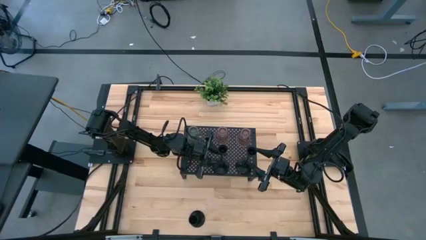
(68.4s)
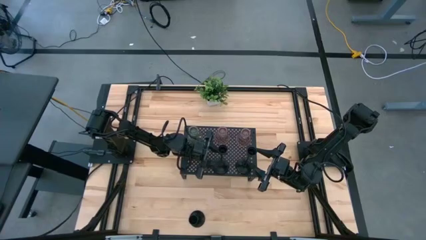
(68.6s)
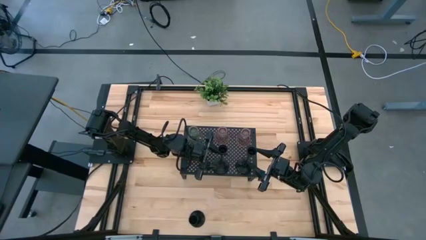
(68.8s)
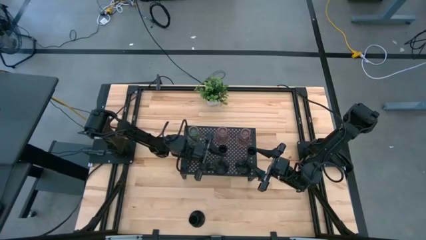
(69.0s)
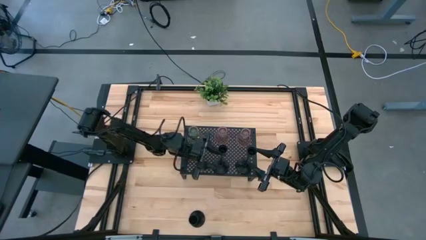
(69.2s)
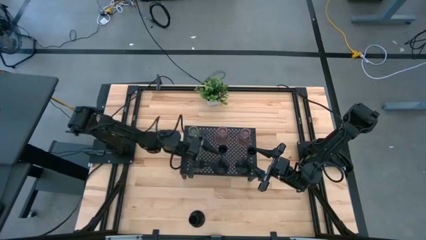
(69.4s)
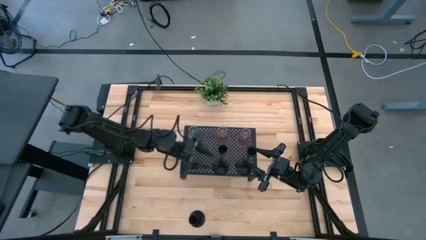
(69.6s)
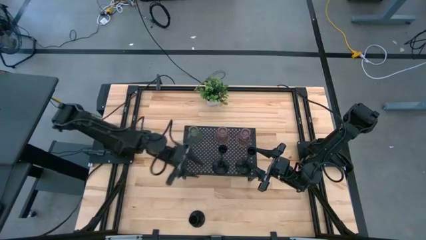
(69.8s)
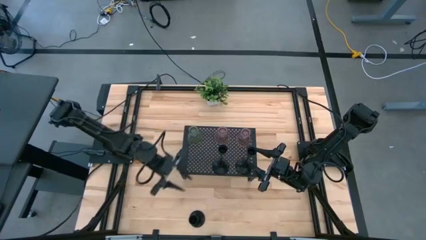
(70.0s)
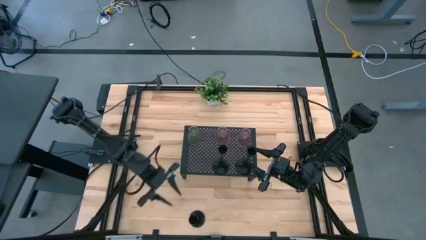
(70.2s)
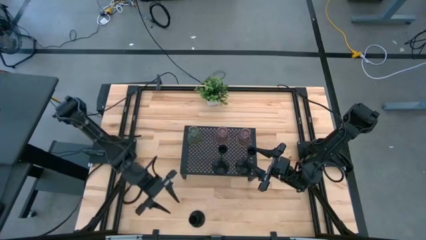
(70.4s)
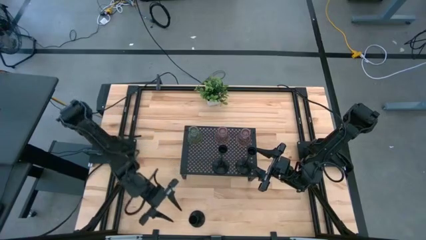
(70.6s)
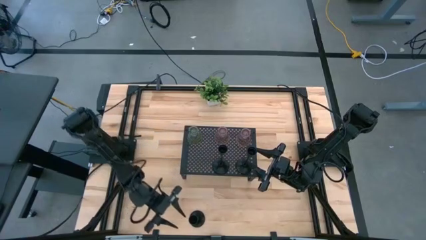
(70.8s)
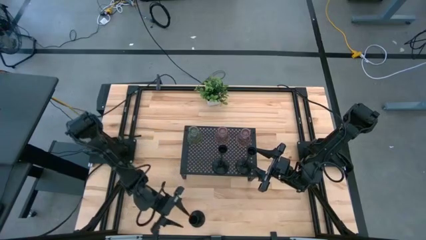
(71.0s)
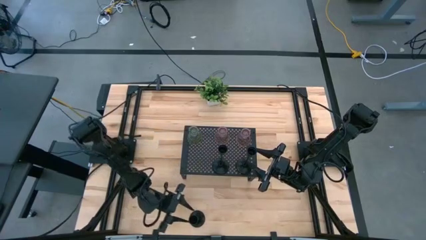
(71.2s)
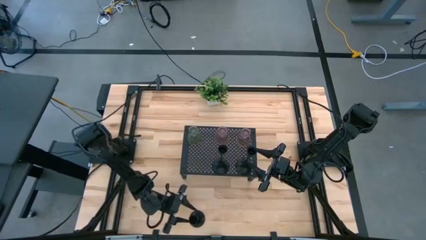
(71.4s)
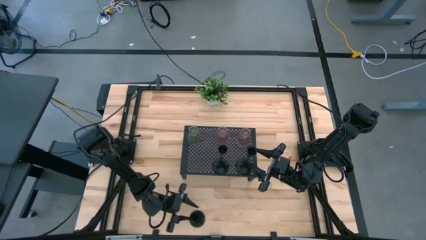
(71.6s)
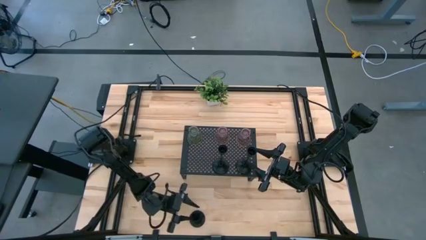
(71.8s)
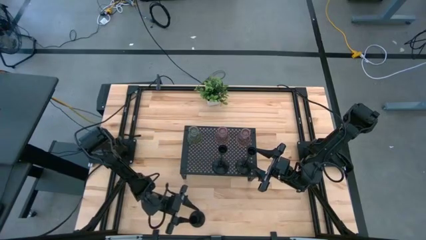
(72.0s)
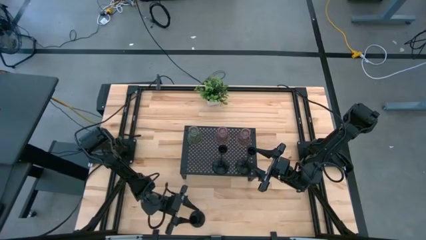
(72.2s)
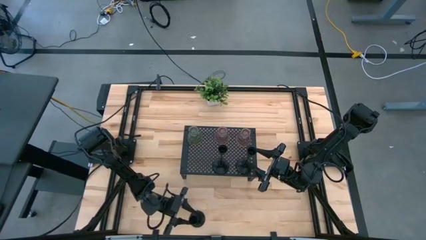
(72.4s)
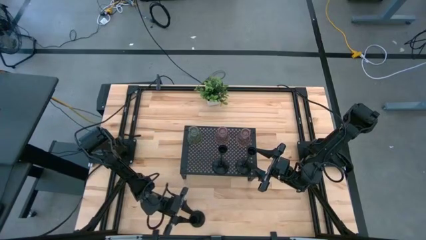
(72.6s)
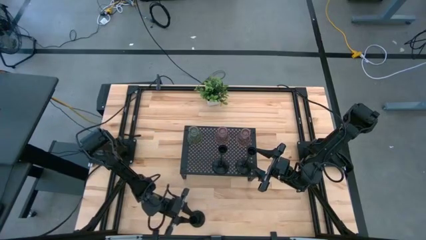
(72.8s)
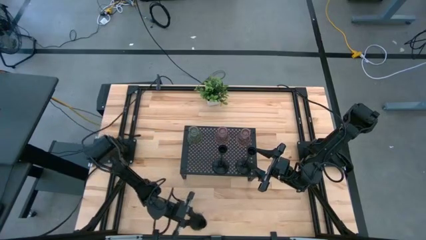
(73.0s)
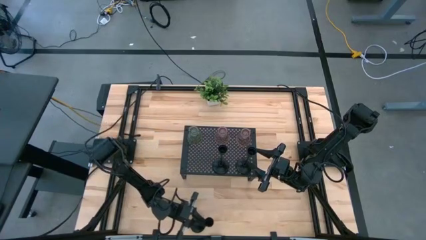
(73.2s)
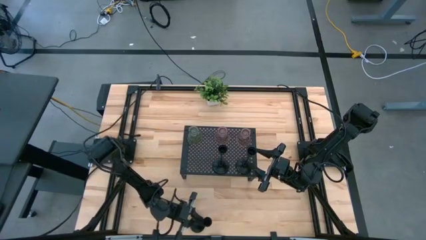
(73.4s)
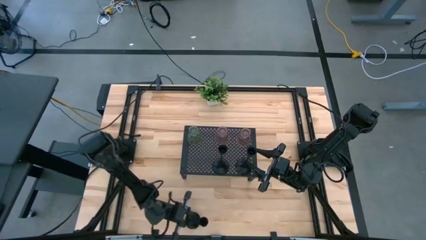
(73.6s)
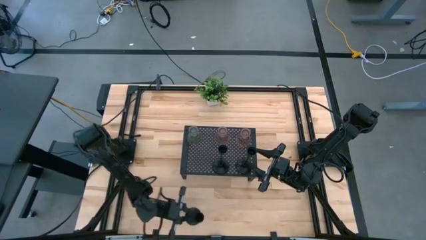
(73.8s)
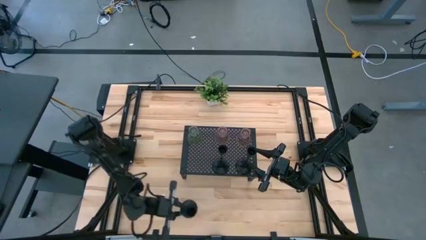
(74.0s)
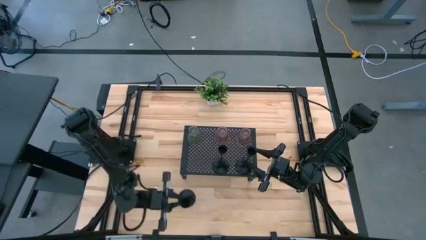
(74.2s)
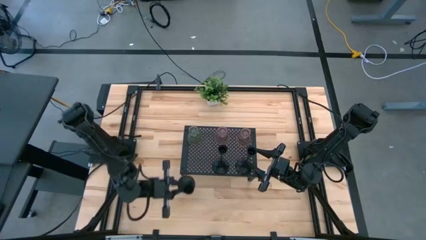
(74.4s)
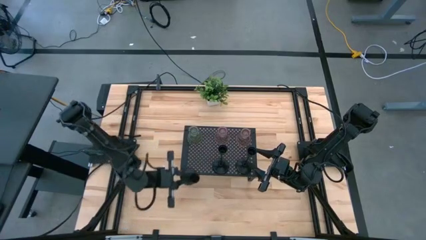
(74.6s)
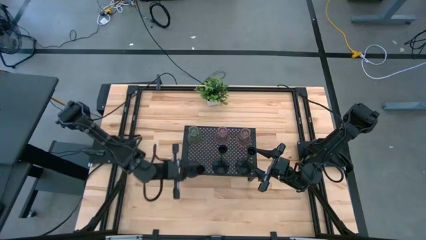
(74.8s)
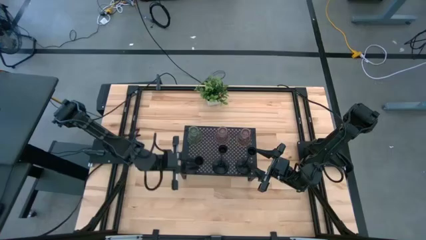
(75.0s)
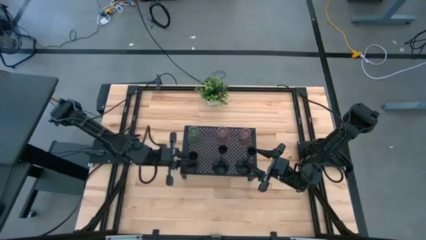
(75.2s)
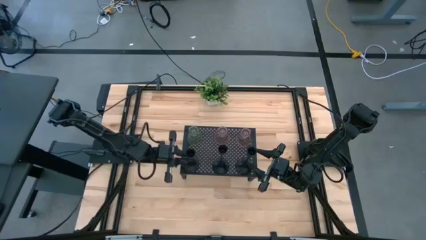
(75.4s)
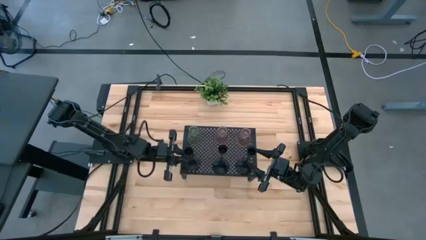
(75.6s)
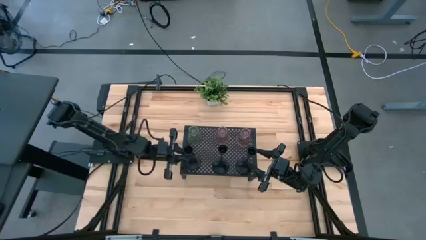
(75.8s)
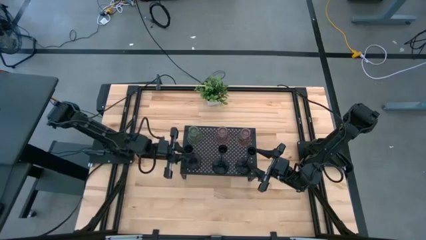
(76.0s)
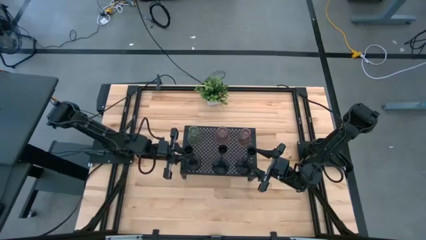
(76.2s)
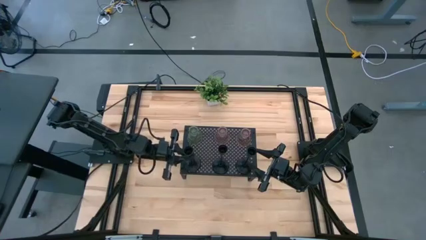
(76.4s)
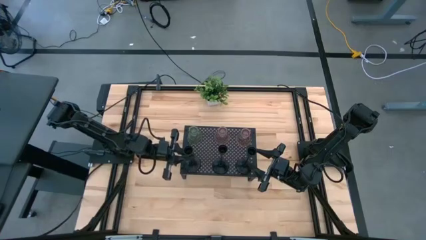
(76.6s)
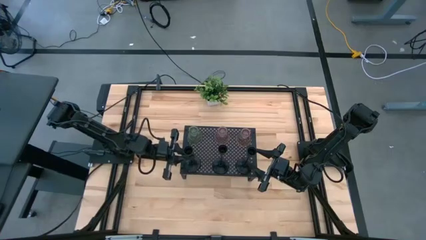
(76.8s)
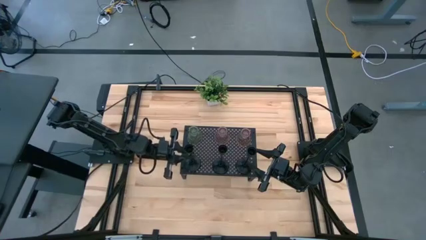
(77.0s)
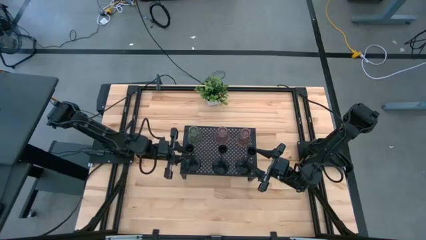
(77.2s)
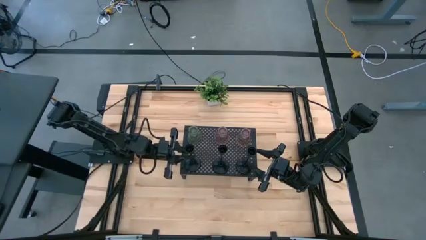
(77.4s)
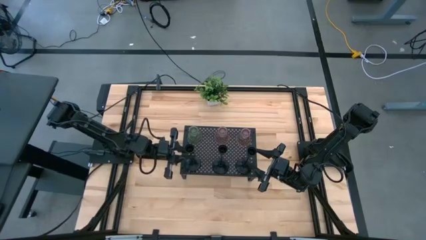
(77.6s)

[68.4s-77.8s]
Task: Pick & Place candle stick holders
Put the black candle holder on the shelf aligned with the other black candle holder

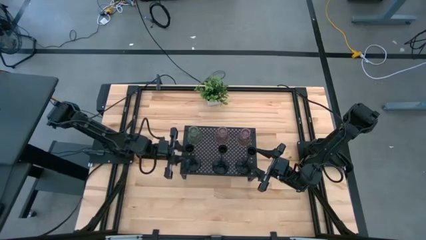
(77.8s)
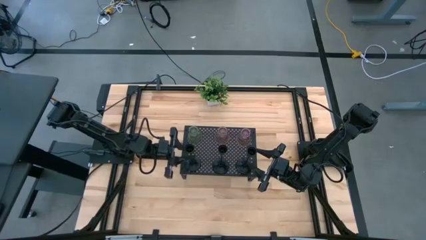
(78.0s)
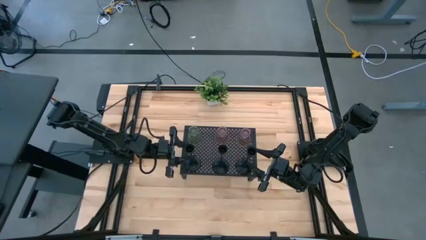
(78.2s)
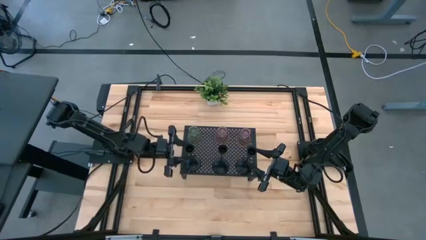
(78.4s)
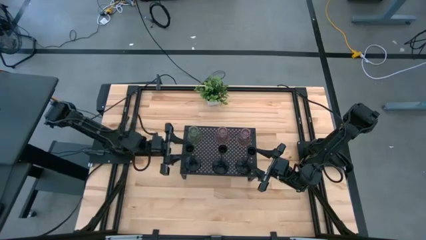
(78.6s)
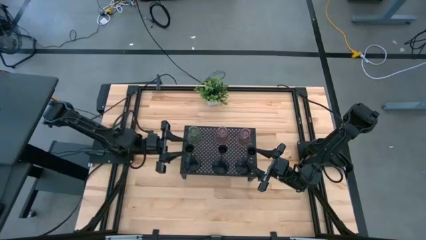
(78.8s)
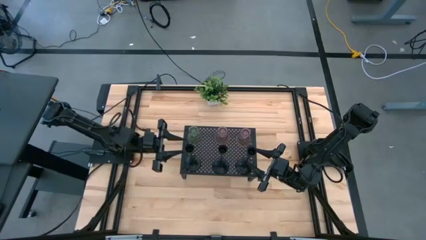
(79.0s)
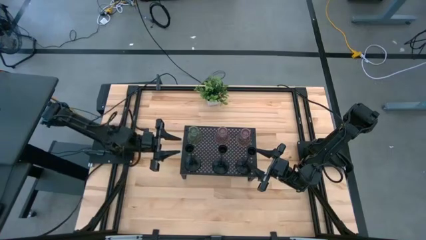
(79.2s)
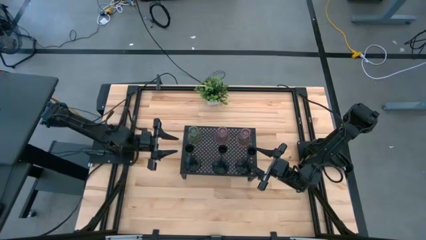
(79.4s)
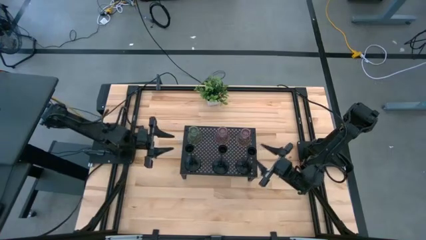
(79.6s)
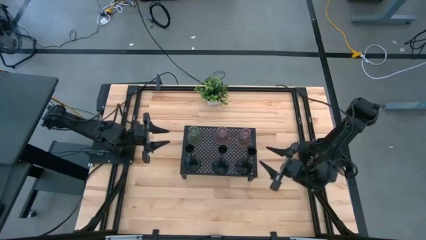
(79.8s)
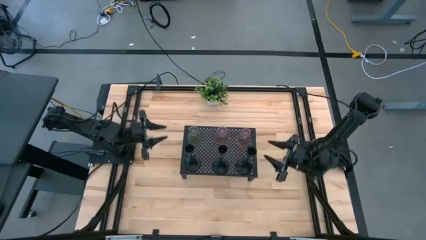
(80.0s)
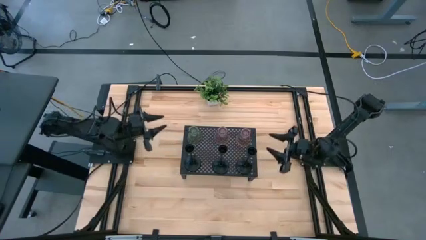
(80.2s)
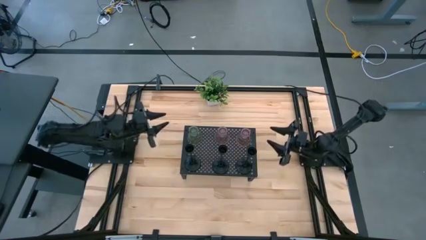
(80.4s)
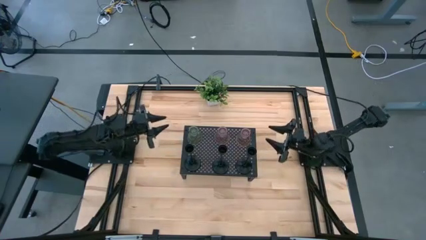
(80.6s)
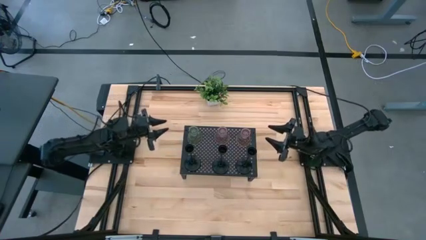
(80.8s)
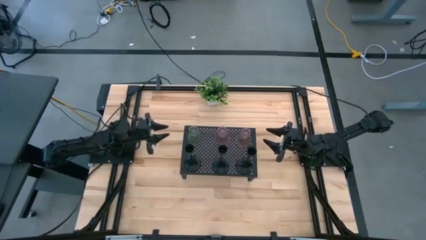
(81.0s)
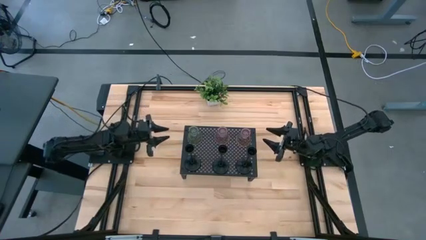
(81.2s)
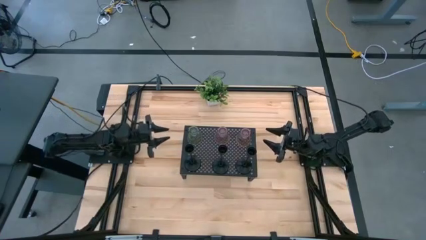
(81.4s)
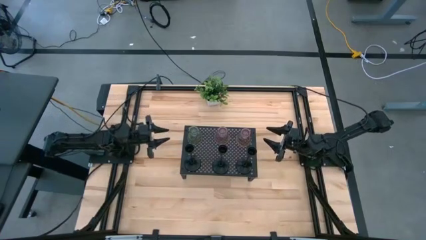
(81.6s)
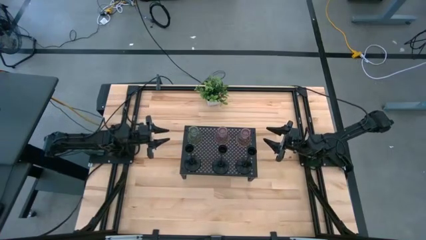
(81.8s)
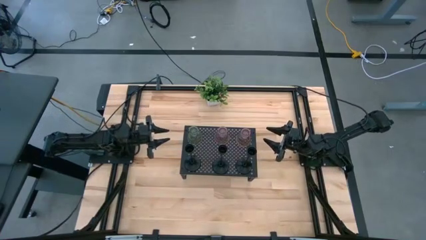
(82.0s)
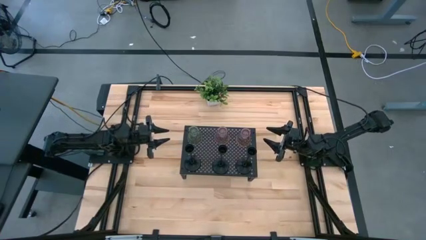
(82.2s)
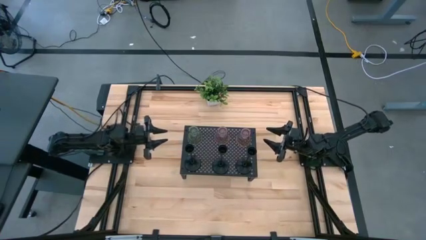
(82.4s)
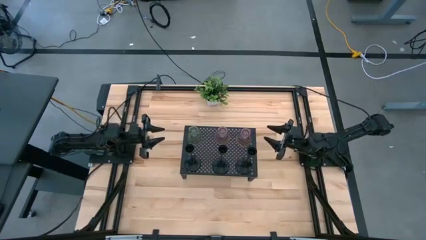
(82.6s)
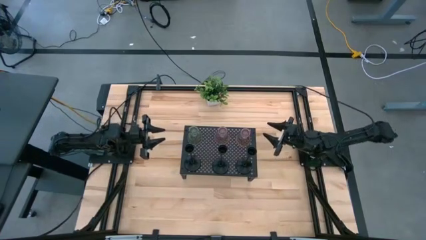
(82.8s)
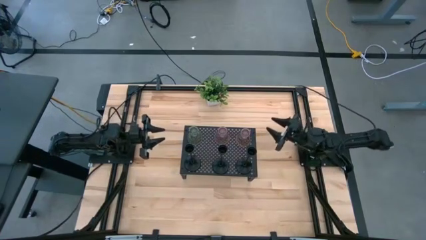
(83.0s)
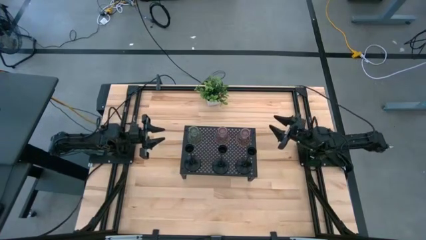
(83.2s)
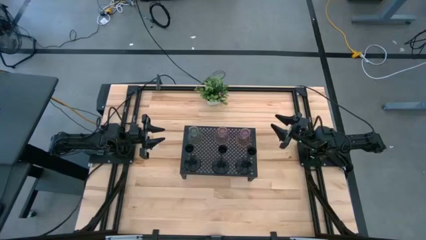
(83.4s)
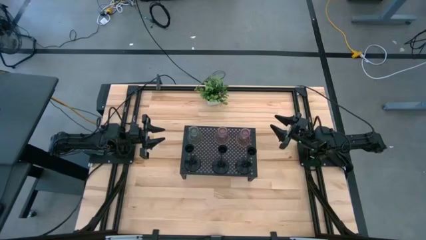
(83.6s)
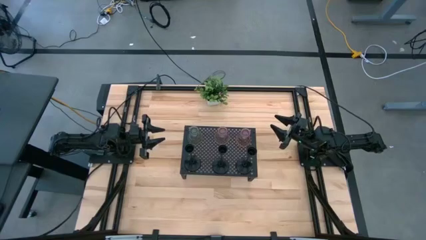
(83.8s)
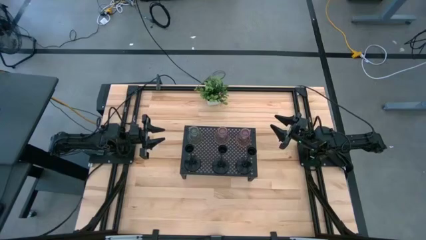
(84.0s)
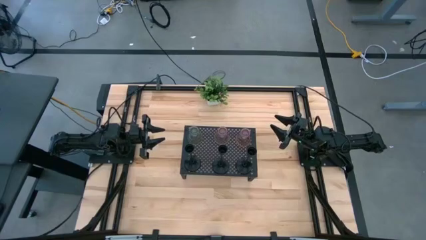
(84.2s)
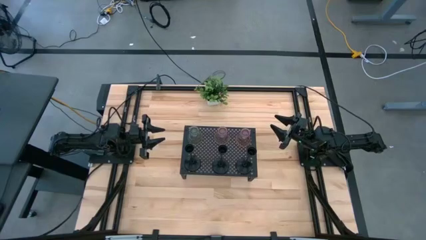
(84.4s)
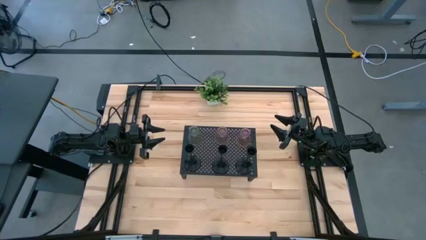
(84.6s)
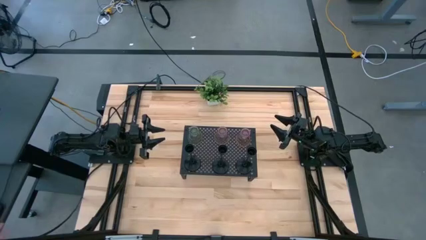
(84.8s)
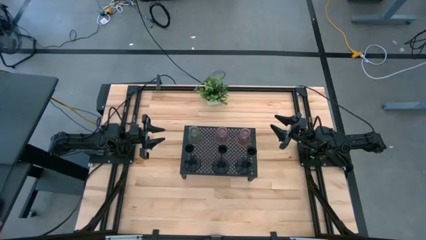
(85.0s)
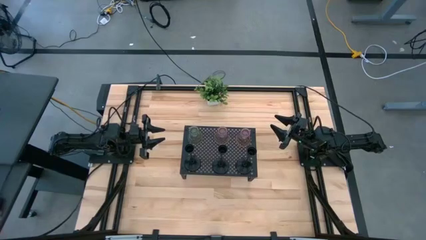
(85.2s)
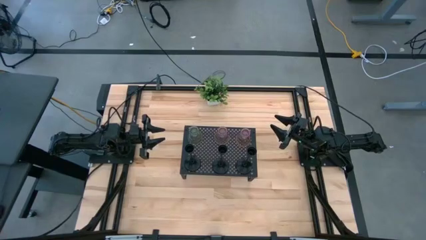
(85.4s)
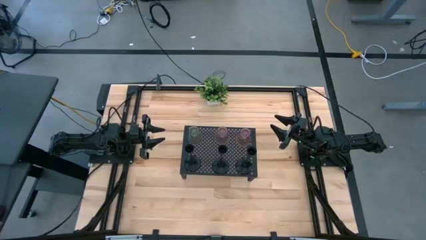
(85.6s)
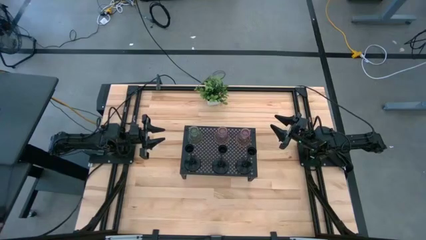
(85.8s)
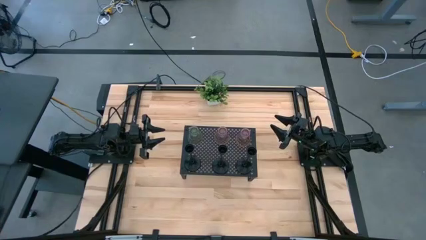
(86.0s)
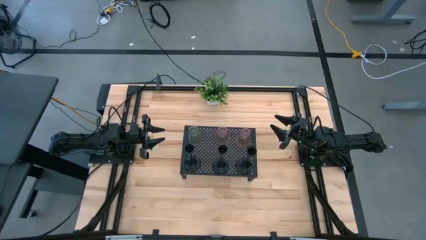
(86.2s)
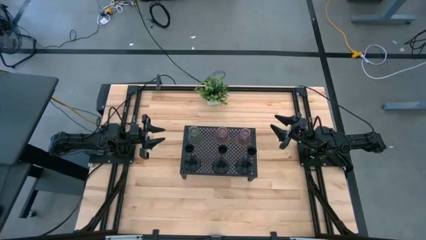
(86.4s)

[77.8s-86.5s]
Return to Home Position
